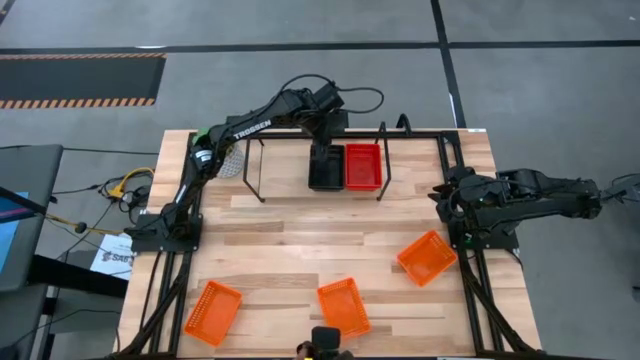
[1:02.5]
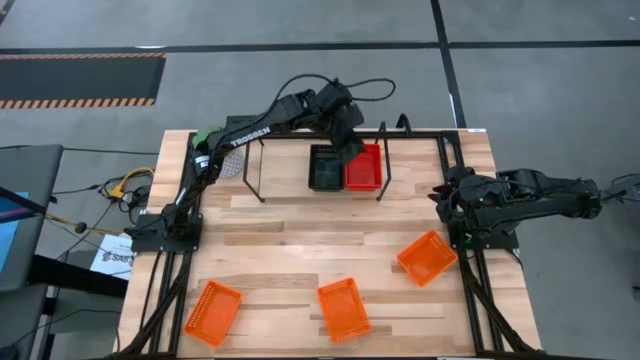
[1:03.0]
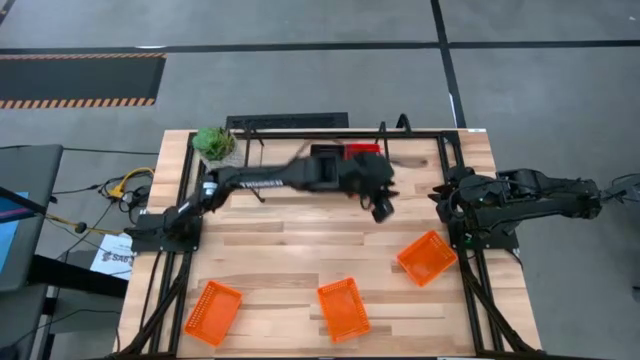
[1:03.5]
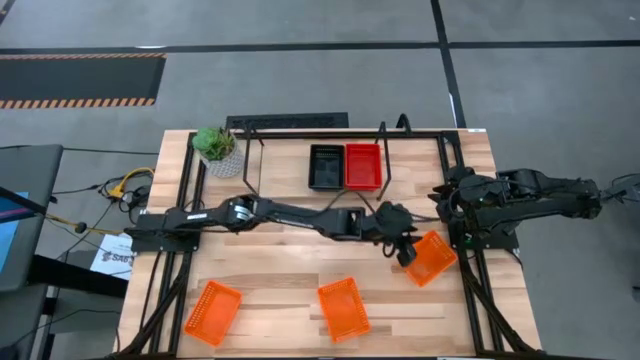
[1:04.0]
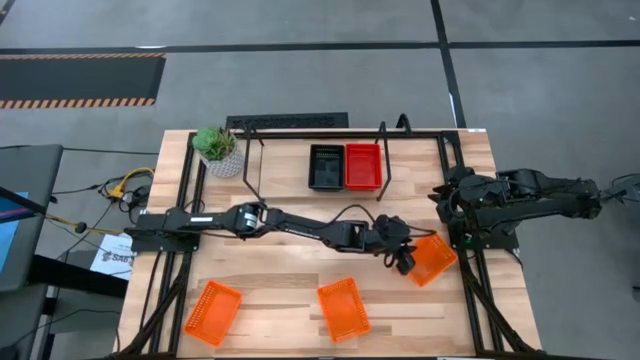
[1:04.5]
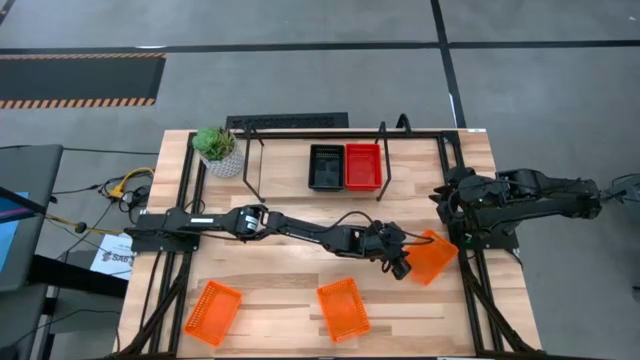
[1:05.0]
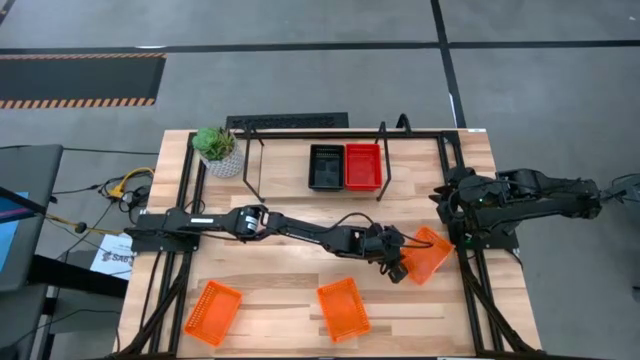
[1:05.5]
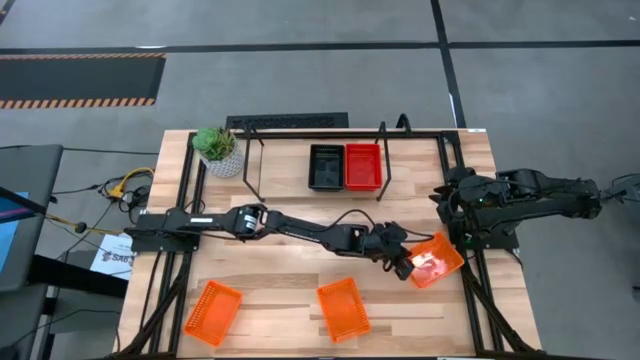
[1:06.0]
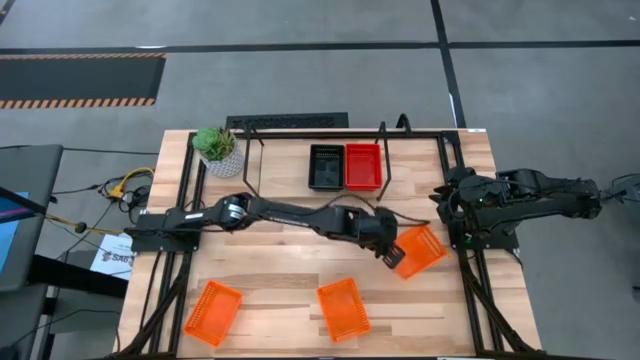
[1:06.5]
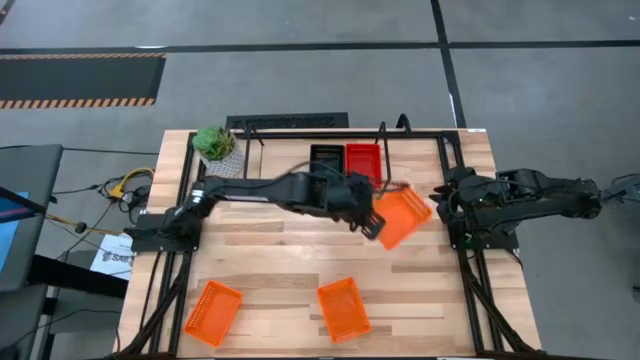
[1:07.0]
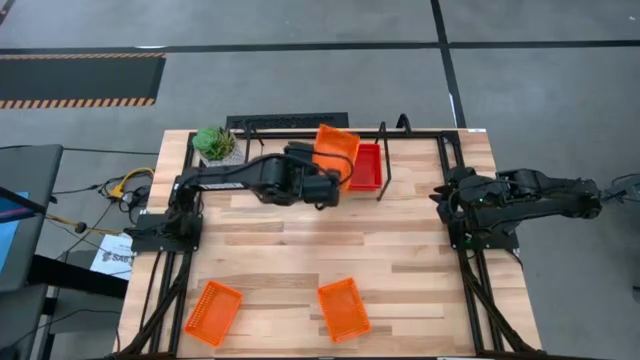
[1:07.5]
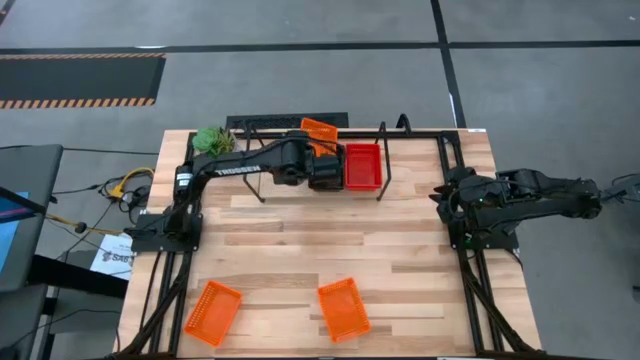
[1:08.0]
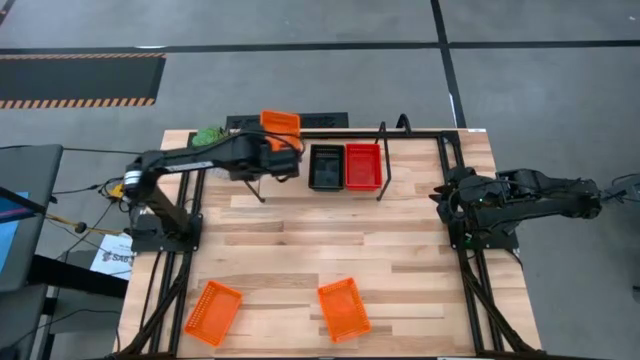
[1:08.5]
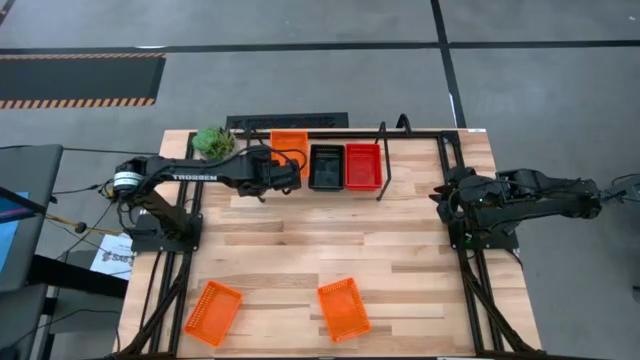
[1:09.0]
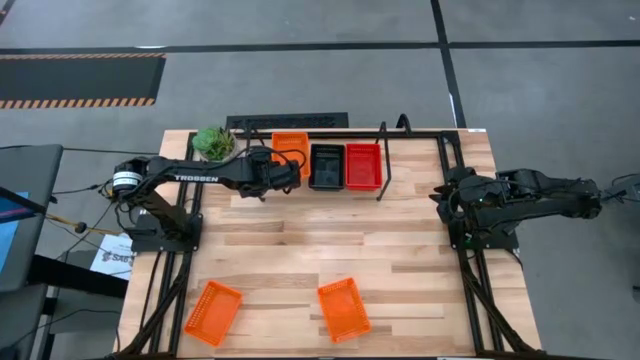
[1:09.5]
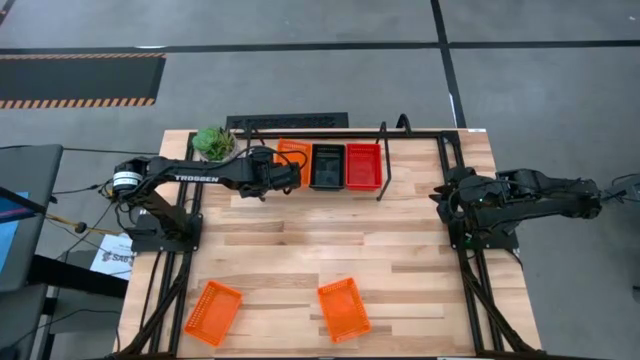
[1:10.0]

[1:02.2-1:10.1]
Task: Stack baskets on shelf by color
Put the top right orange bin on the shelf

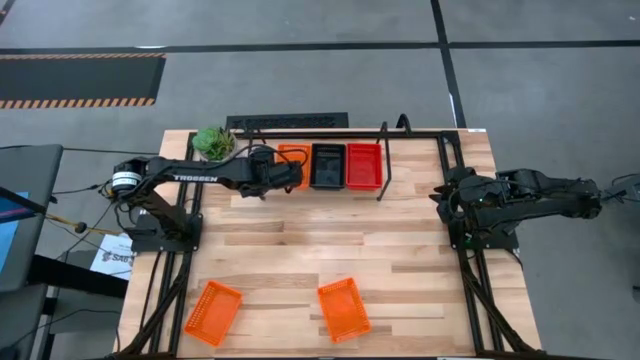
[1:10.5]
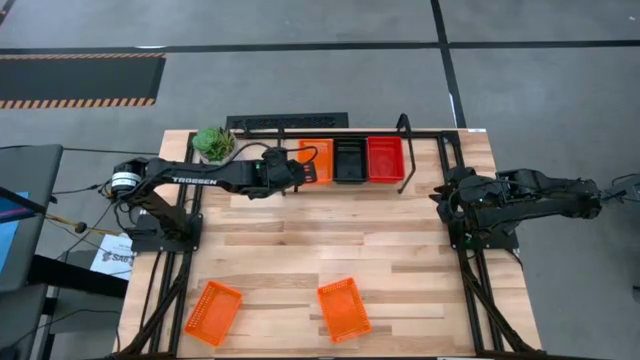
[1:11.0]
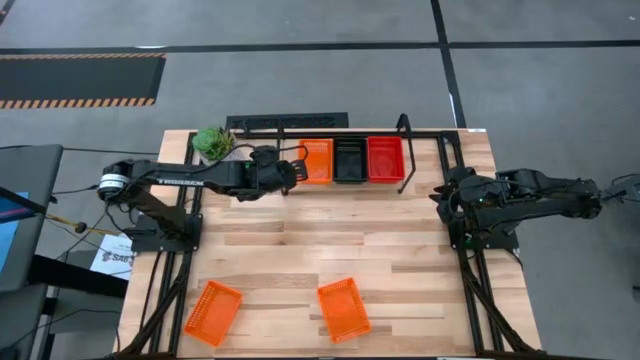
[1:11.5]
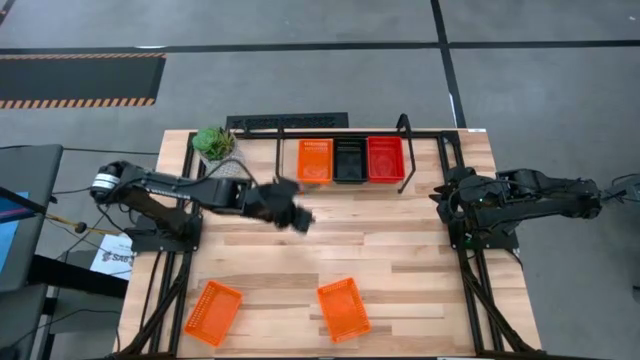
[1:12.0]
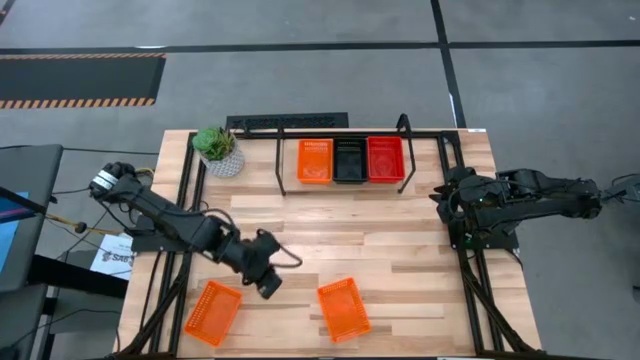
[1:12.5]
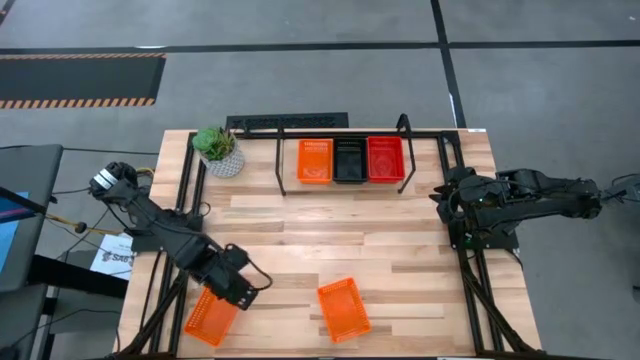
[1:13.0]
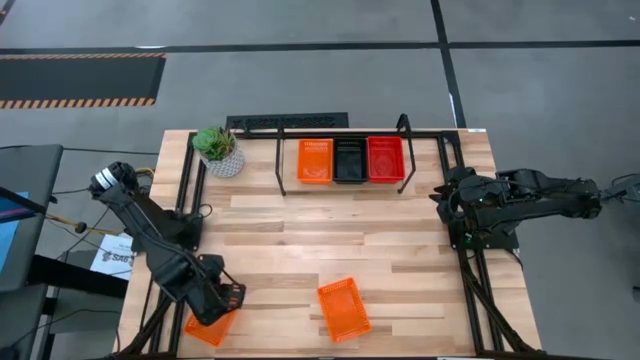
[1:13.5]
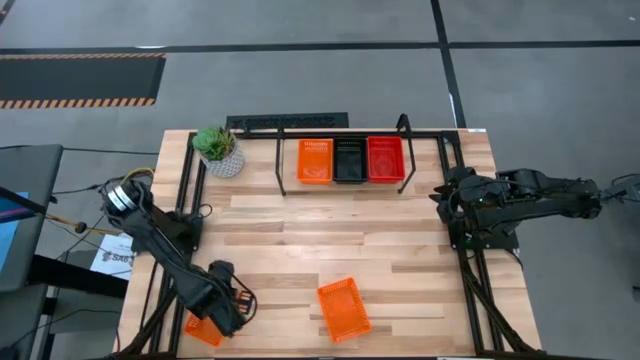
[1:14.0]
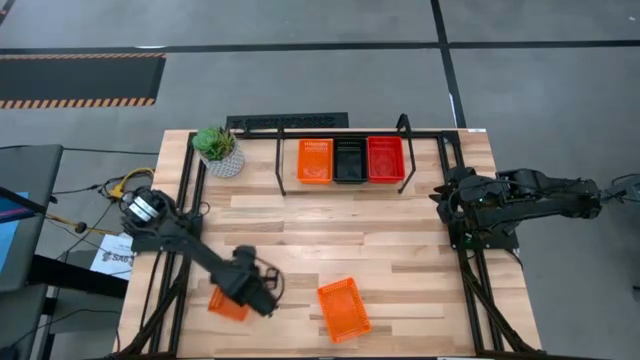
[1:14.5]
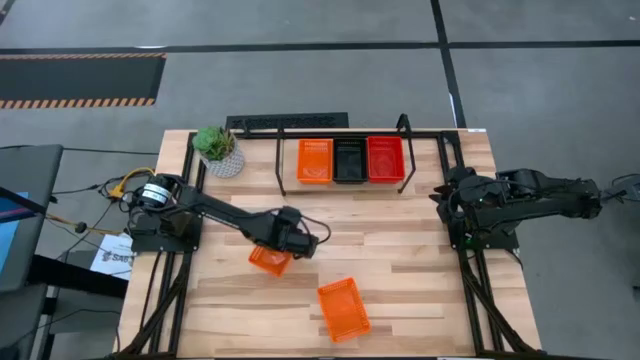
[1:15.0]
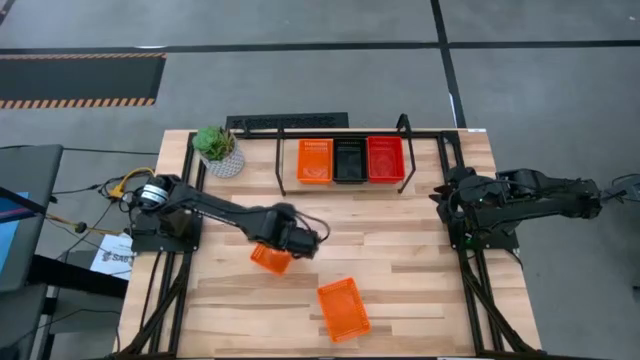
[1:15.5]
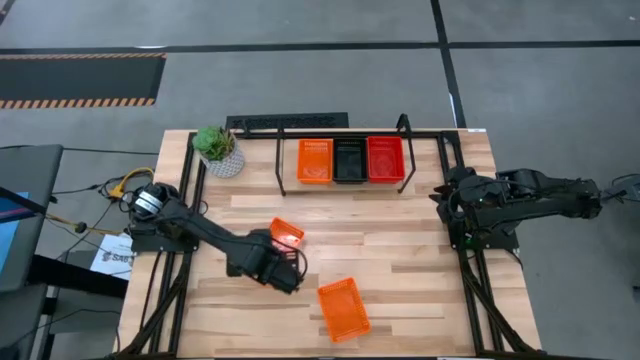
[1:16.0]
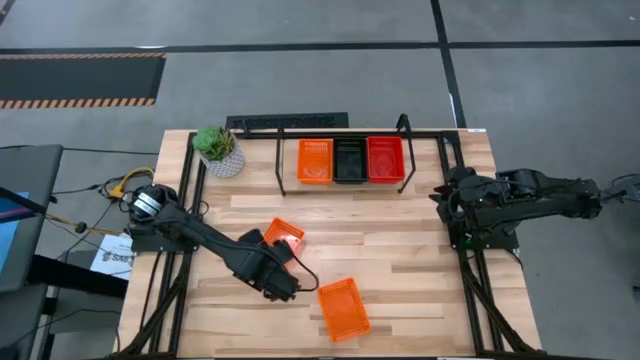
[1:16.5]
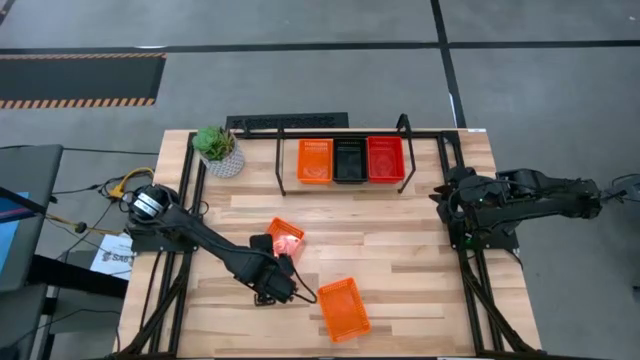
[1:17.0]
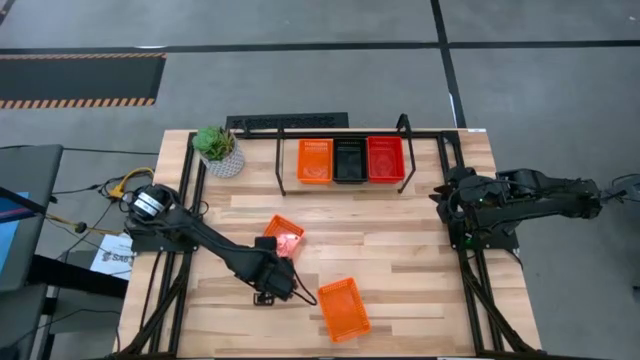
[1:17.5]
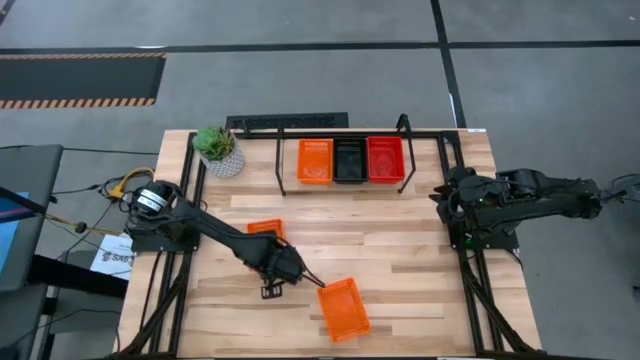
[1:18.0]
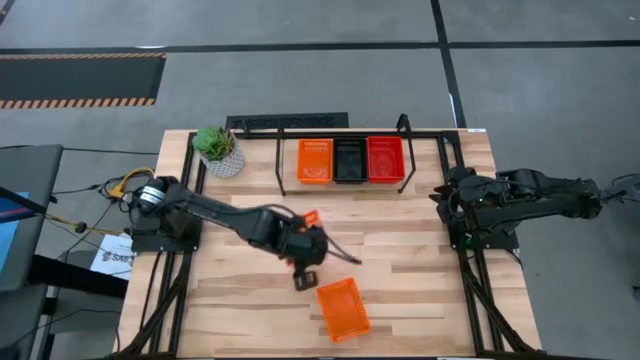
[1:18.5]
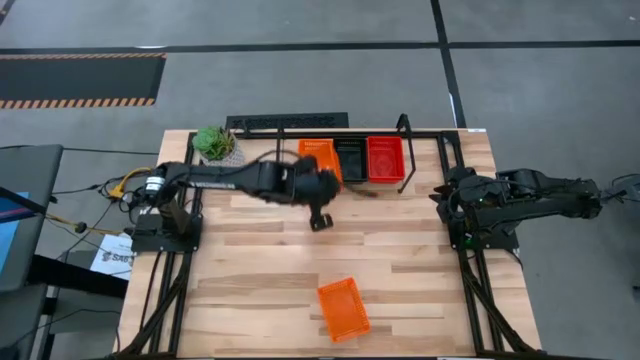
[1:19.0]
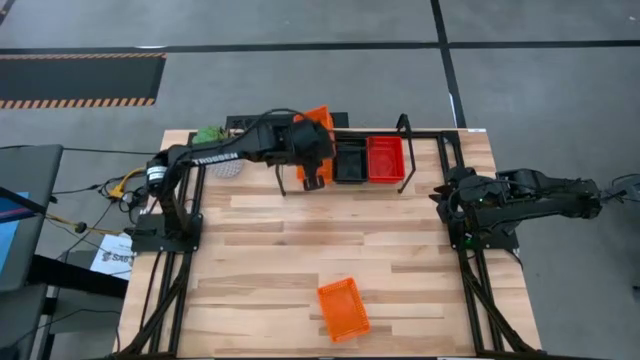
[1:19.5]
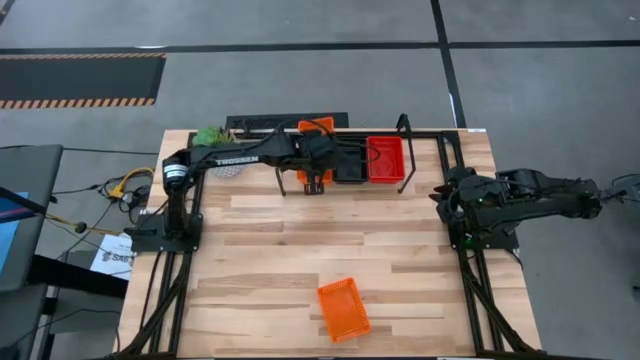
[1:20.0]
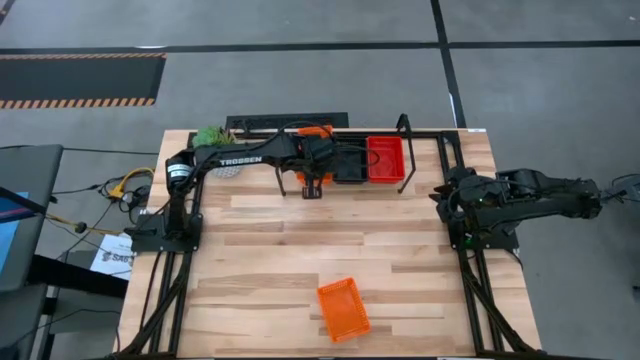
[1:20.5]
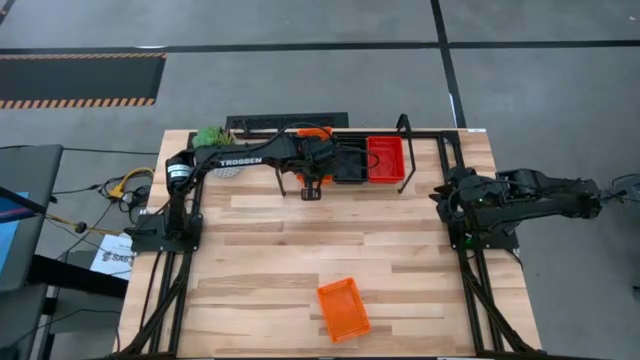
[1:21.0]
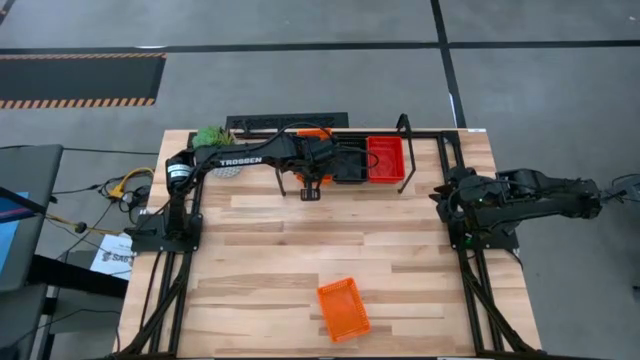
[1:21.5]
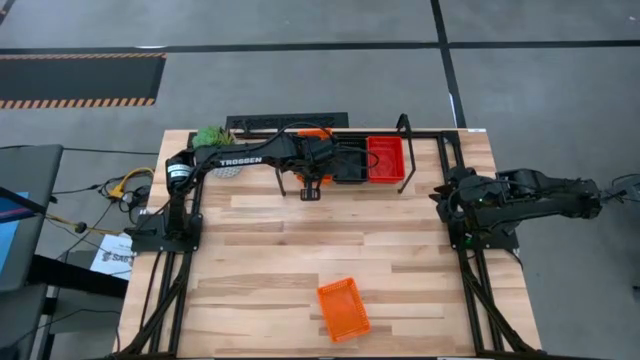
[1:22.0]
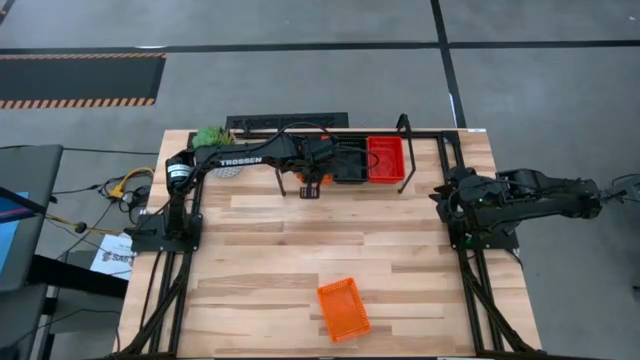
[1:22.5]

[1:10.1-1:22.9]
Stack the left orange bin on top of the orange bin on the shelf

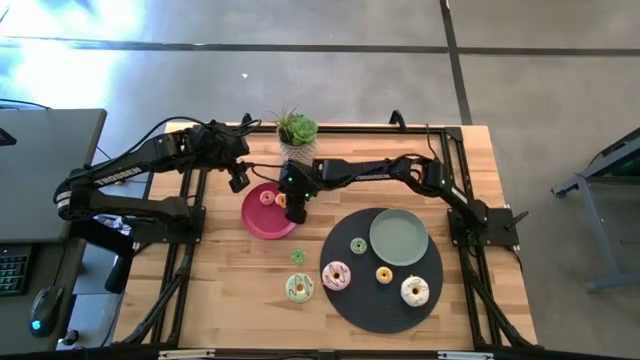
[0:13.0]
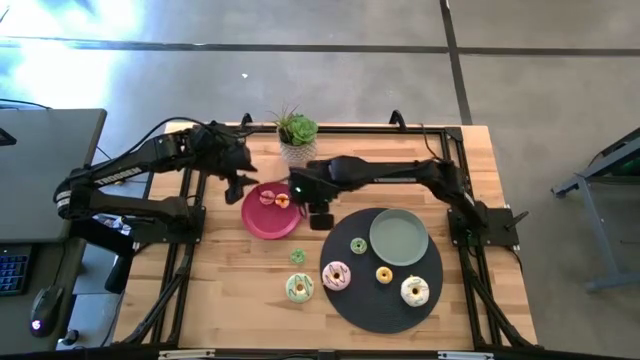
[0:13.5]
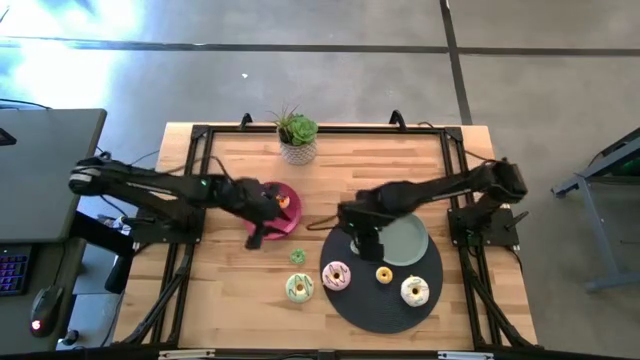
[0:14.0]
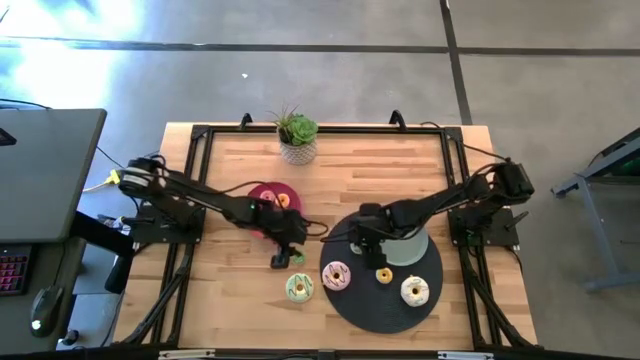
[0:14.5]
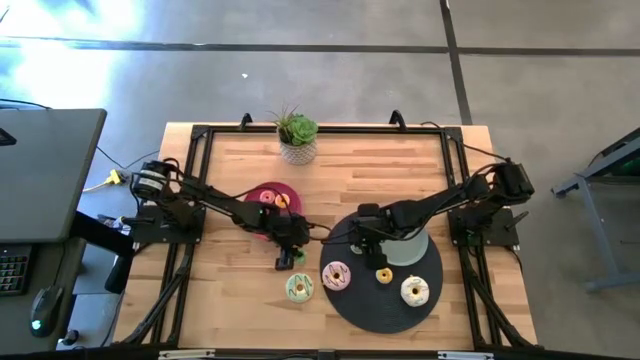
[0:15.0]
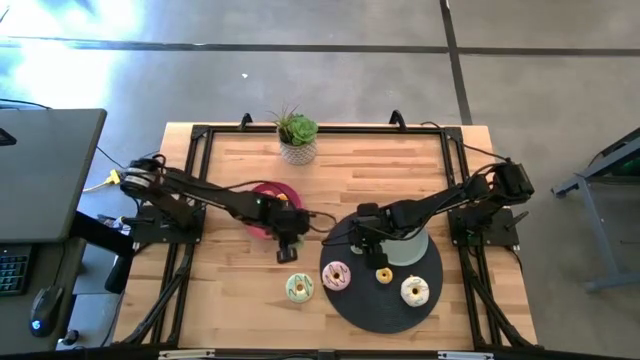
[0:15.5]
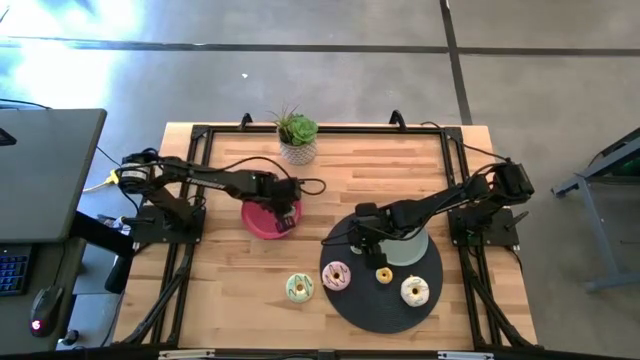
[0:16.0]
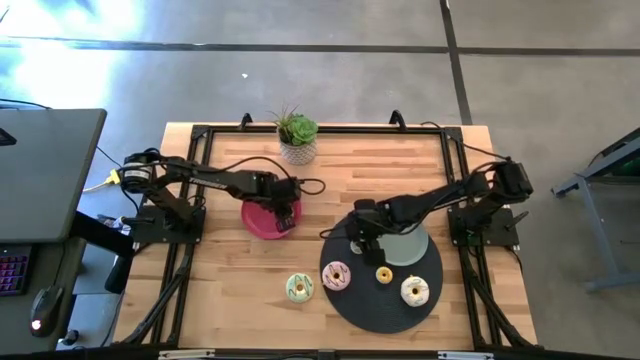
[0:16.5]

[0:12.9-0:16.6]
Task: Pick & Place donuts
Put the left small green donut on the pink plate
